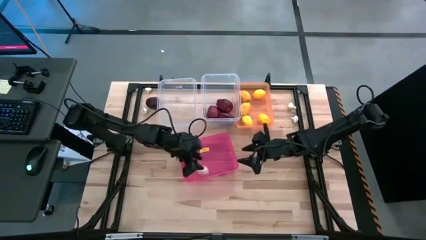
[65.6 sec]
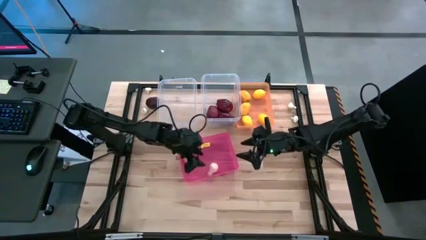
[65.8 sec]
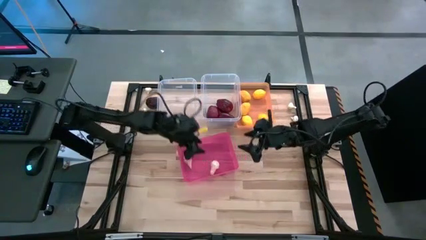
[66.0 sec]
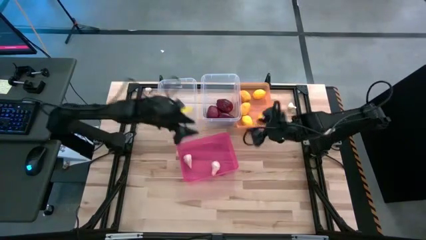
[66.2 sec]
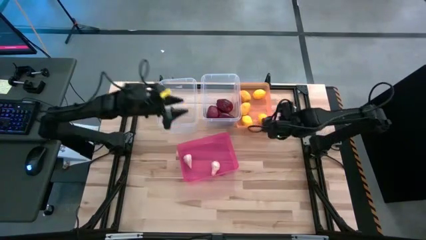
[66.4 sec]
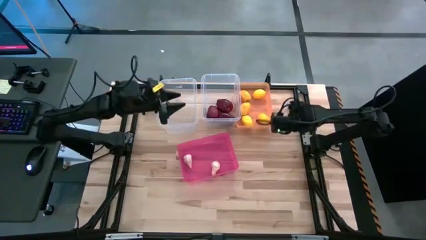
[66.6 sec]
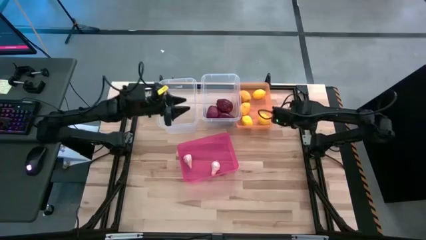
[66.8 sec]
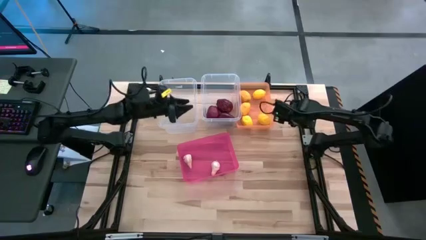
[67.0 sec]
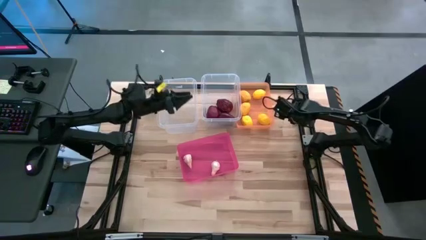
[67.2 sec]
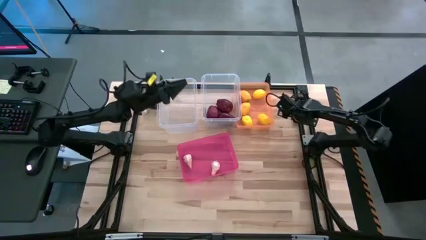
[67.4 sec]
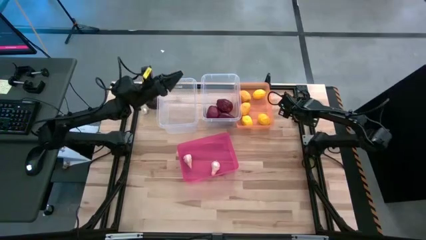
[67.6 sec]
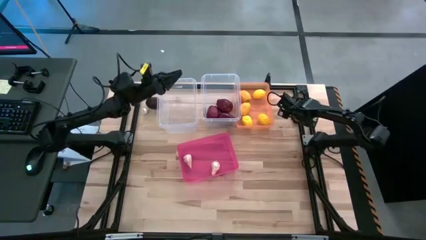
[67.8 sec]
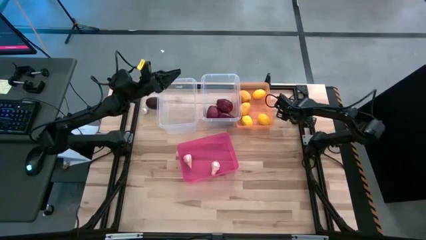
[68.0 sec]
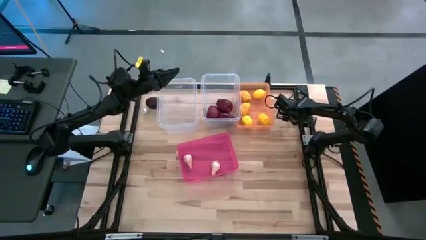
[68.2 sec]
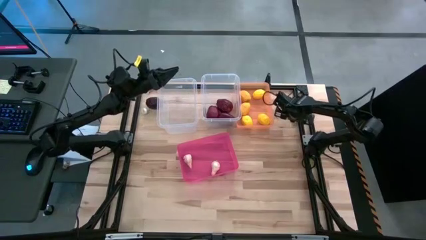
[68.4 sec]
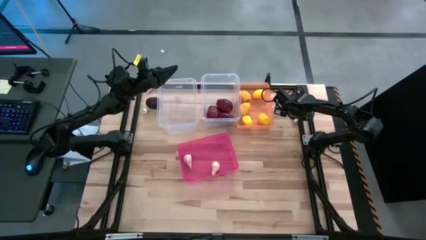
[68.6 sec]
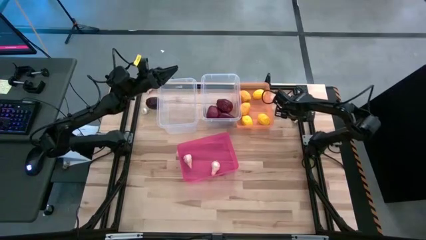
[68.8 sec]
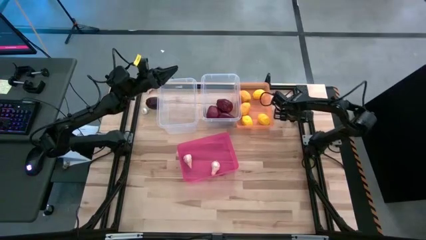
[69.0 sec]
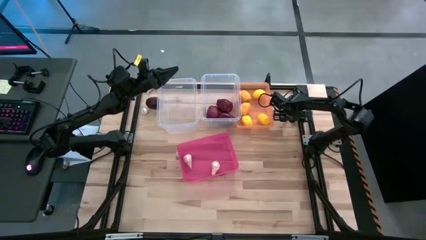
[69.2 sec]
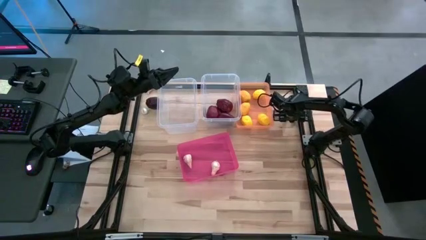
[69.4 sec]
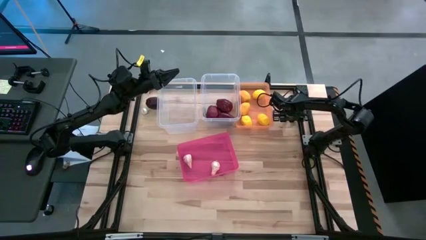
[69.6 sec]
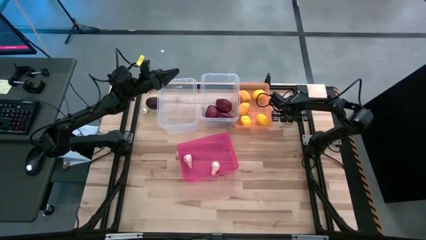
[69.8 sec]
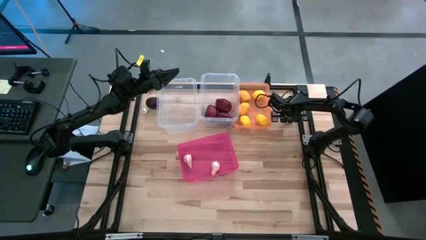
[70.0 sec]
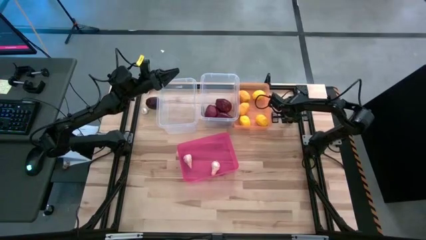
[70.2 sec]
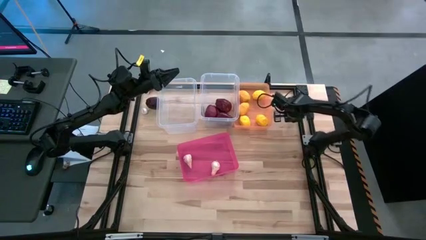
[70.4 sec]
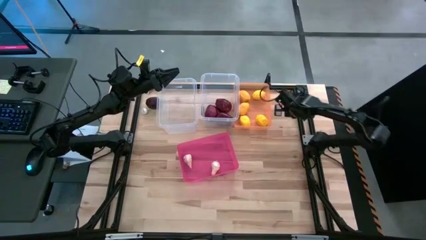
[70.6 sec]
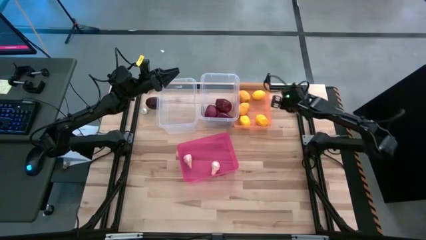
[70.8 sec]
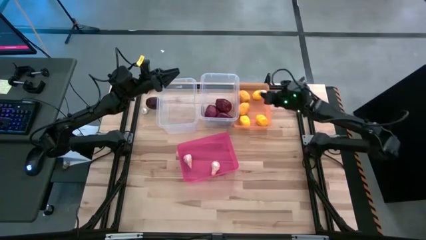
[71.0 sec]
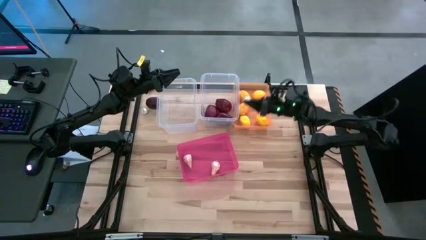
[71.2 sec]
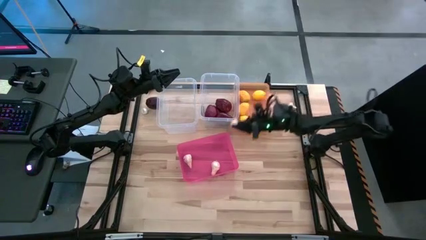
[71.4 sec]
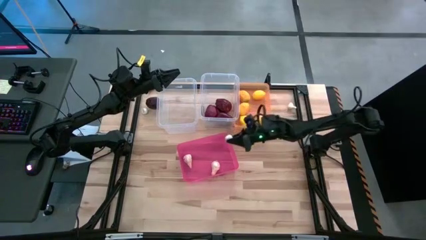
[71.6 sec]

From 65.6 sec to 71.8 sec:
Task: Sort produce into baskets
Put the white garlic into the pink bin

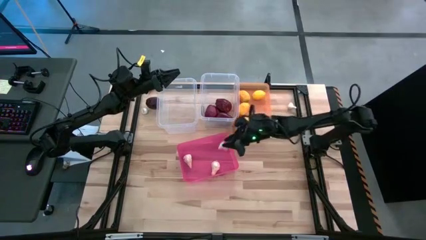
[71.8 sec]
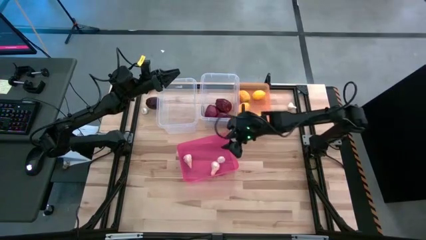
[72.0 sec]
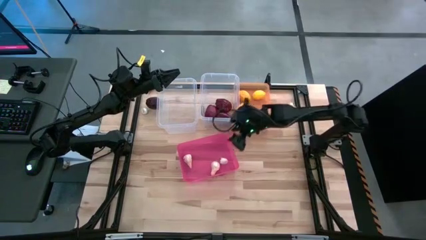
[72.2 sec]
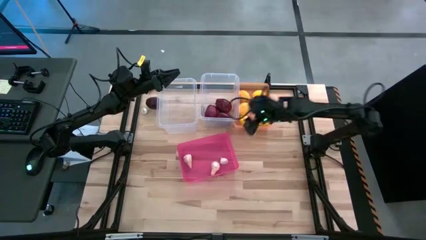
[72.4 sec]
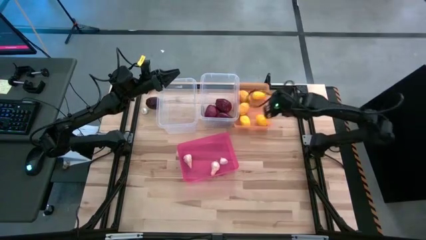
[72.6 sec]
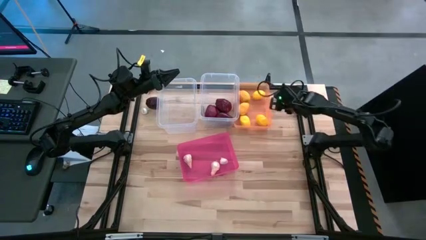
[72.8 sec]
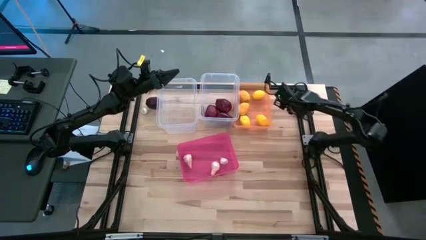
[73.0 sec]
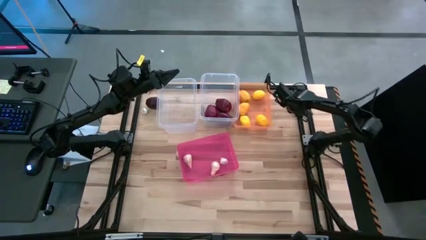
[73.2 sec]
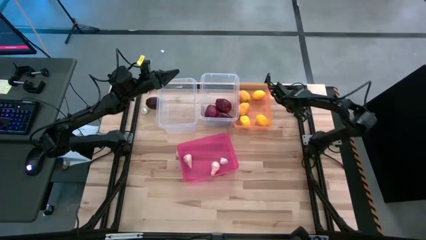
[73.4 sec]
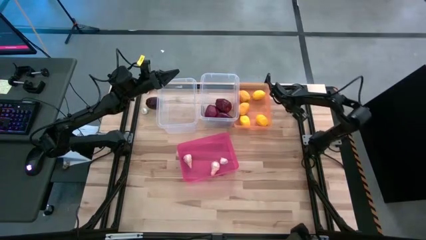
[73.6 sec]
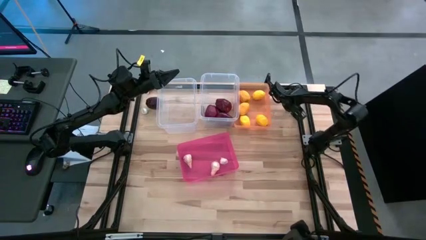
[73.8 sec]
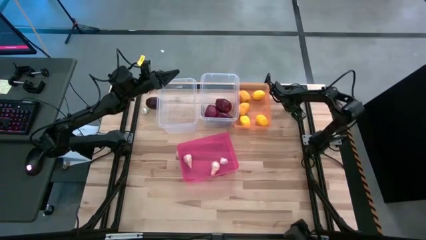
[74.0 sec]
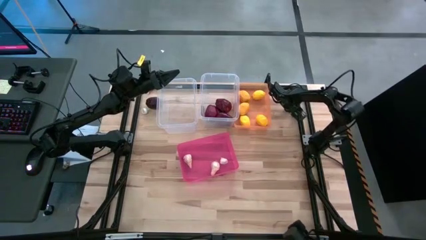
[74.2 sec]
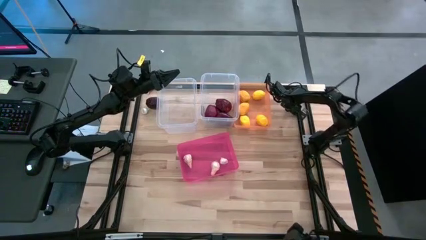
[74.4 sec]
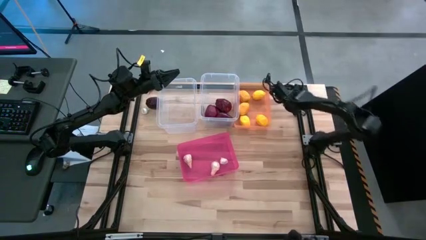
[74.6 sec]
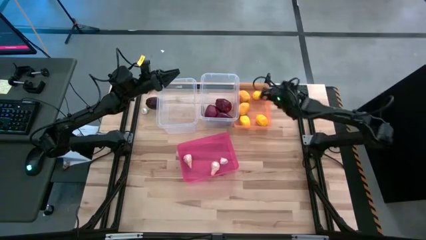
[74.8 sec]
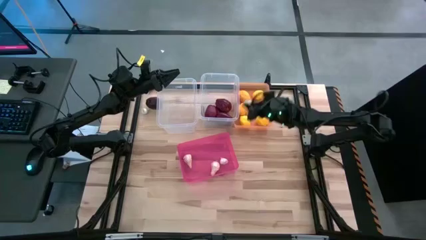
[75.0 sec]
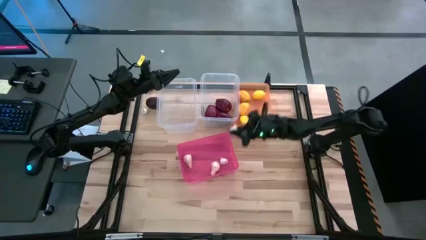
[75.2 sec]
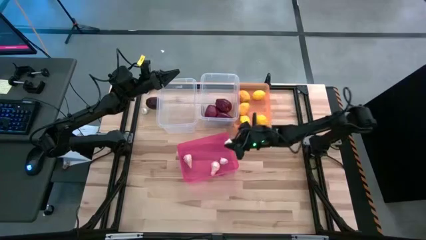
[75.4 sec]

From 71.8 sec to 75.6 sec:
Put the white garlic into the pink bin

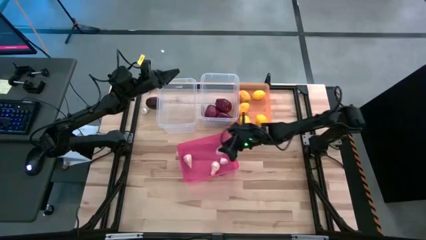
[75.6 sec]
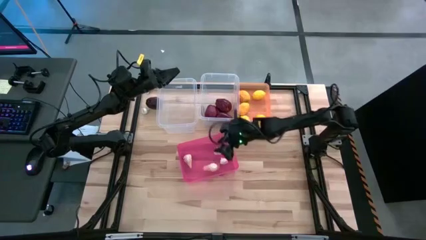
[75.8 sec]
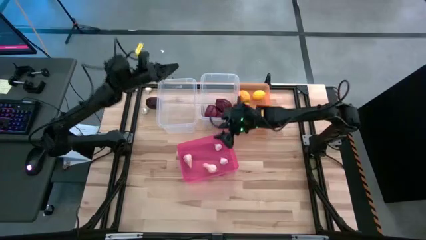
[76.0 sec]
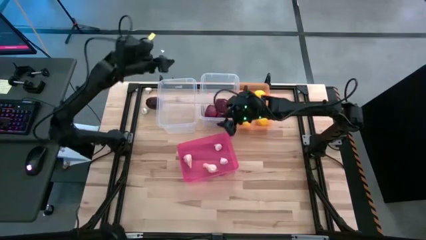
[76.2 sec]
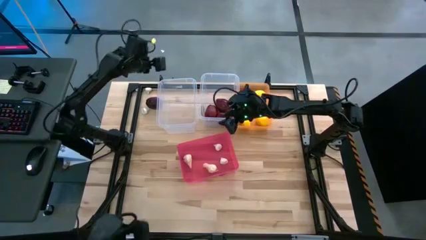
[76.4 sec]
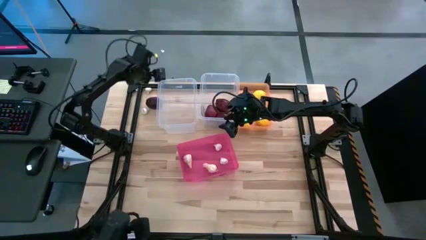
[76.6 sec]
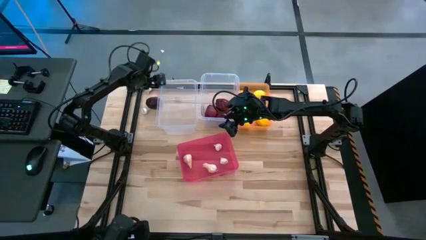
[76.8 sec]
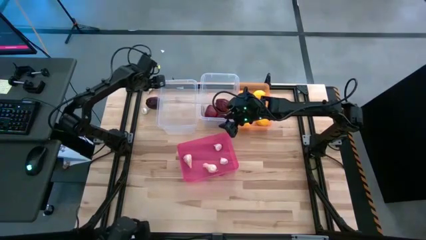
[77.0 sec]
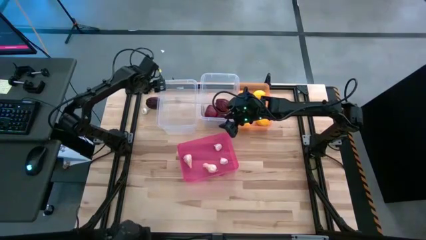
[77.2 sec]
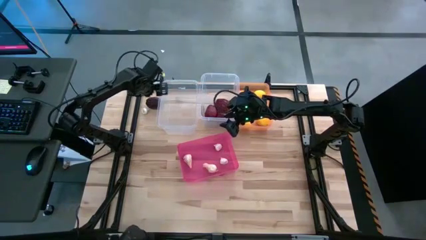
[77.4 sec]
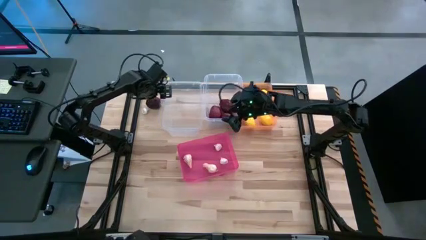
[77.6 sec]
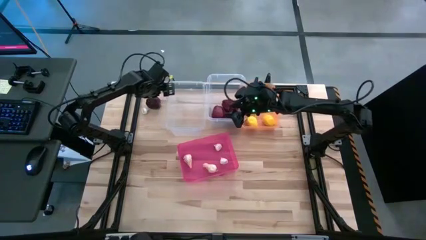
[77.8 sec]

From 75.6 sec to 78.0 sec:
Adjust the left transparent bin

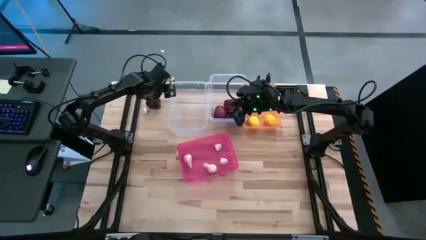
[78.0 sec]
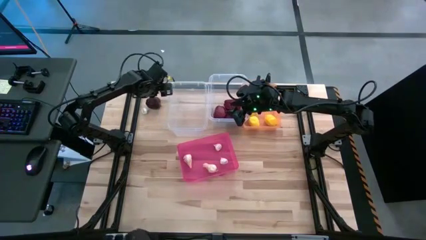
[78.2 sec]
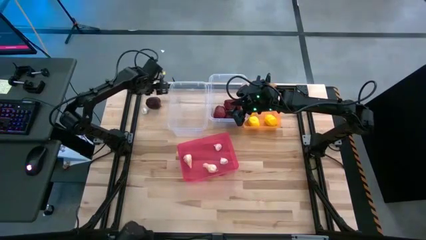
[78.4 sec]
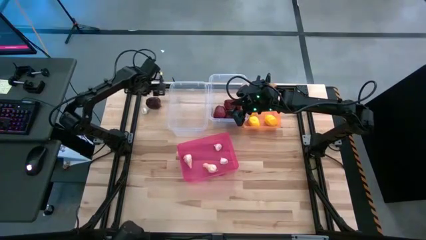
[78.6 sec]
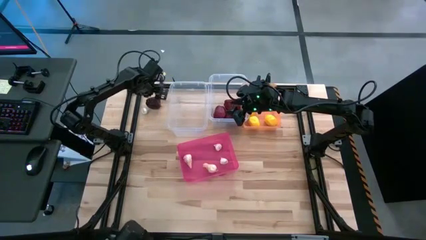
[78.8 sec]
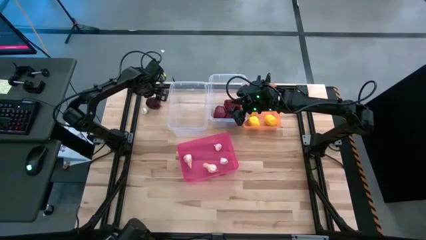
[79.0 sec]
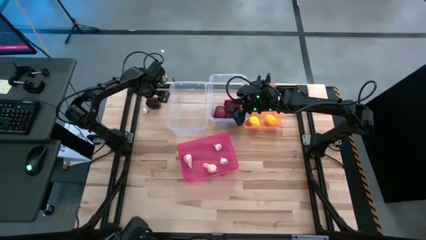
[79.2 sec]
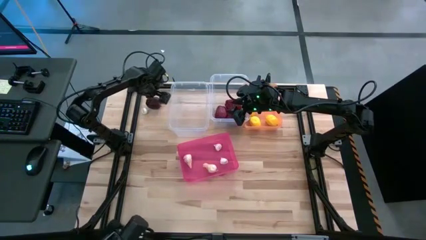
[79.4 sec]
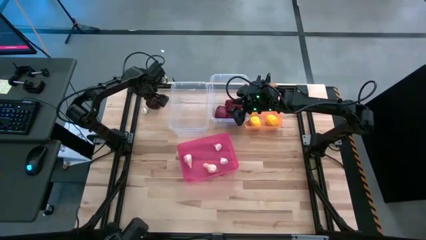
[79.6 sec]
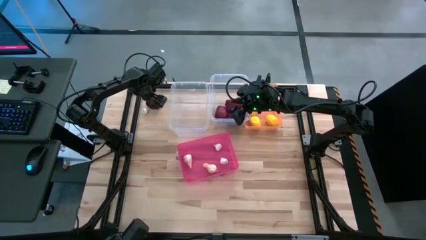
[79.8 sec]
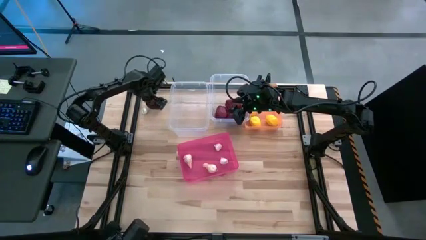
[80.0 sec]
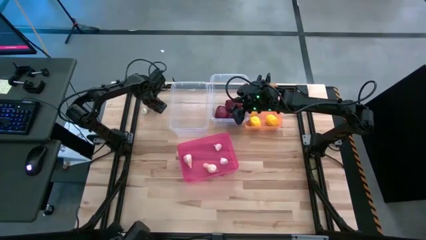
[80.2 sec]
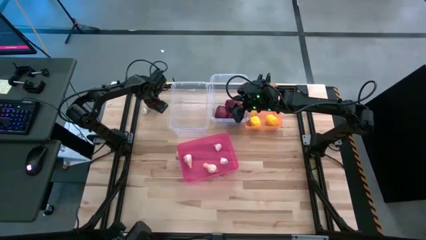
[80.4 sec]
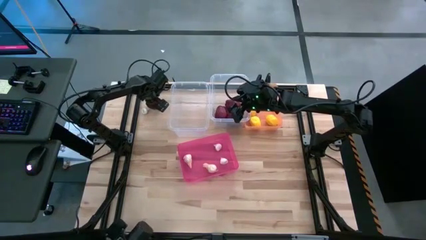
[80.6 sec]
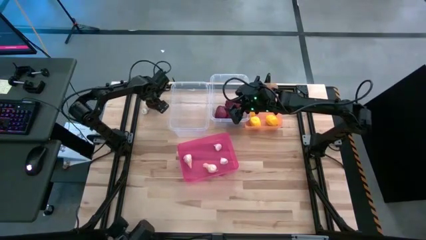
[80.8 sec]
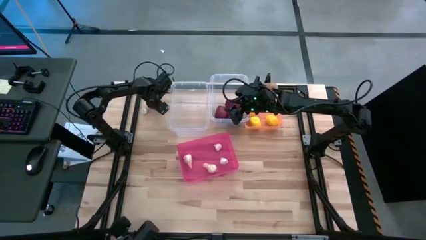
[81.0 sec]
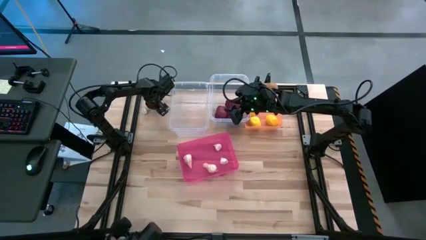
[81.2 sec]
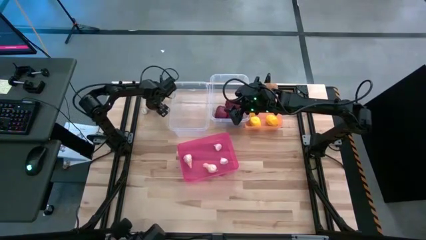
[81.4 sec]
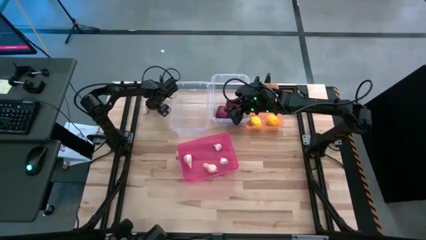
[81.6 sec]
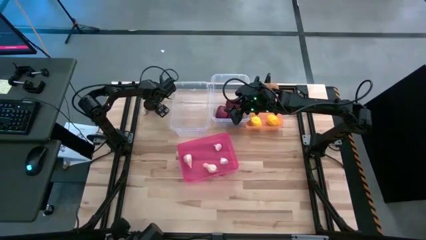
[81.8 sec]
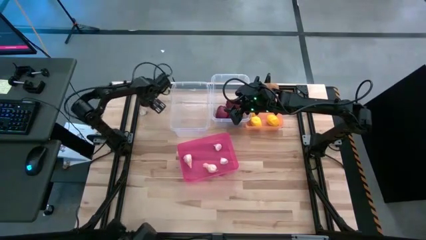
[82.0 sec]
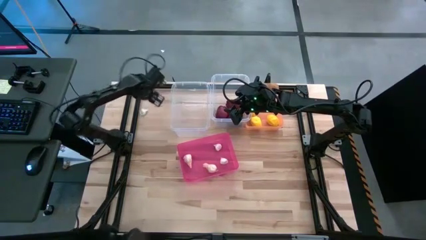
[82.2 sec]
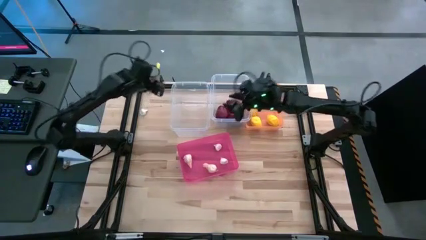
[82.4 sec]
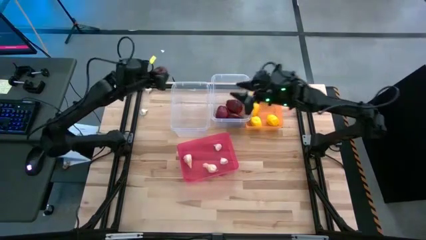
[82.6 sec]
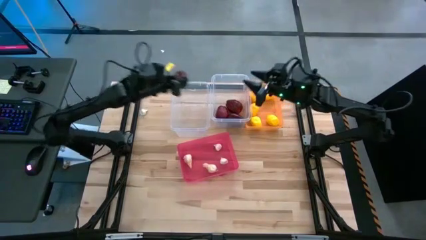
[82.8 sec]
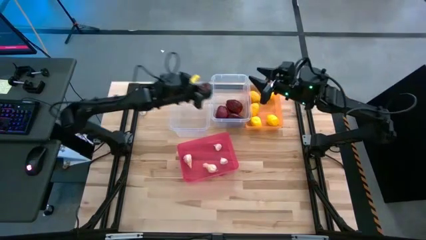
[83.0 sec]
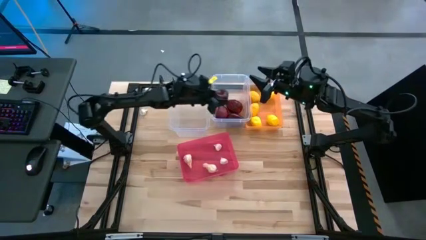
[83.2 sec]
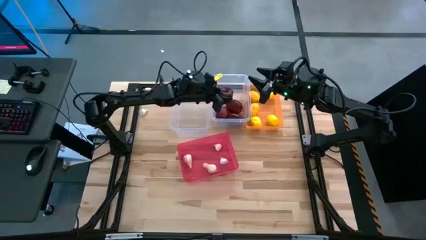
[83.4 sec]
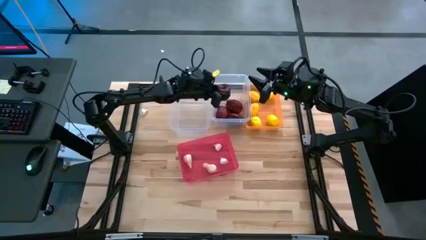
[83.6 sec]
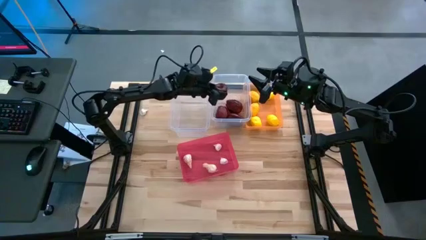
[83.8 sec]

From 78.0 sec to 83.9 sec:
Put the red apple into the right transparent bin
